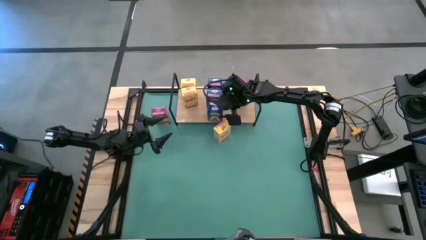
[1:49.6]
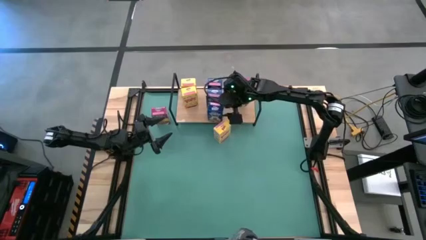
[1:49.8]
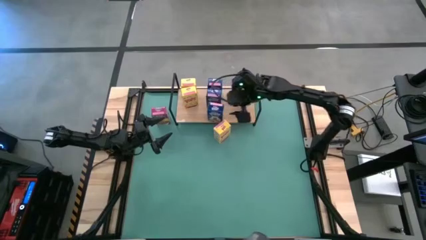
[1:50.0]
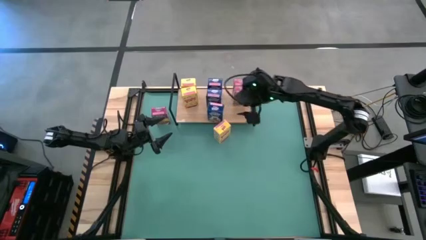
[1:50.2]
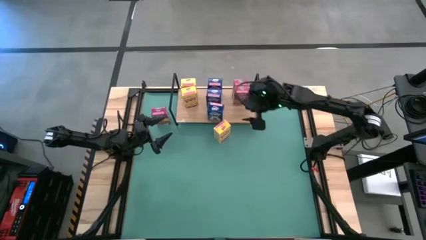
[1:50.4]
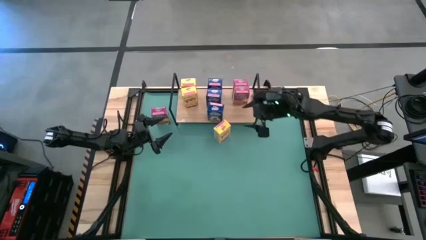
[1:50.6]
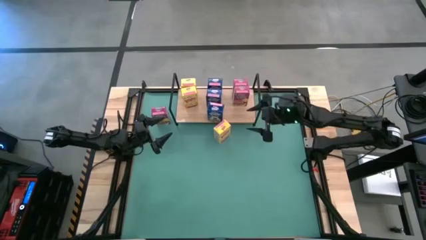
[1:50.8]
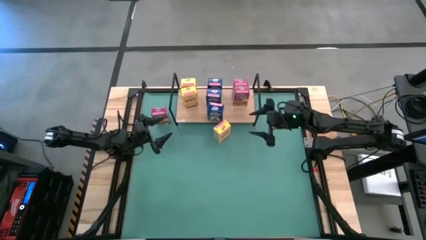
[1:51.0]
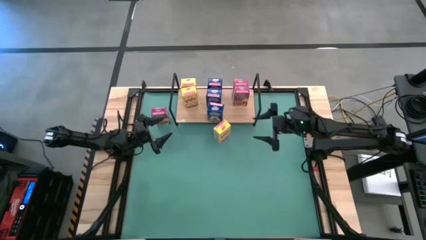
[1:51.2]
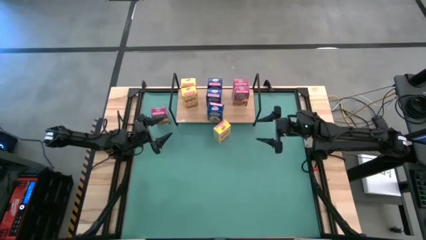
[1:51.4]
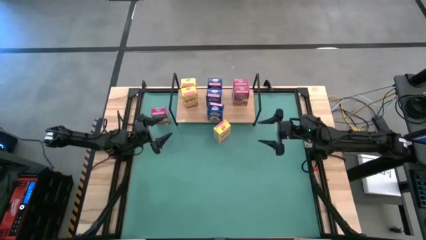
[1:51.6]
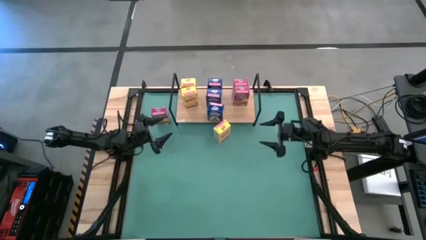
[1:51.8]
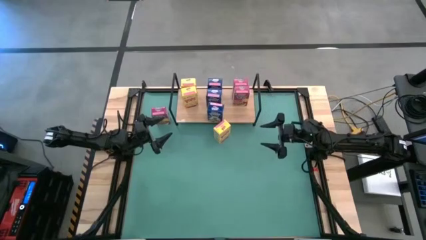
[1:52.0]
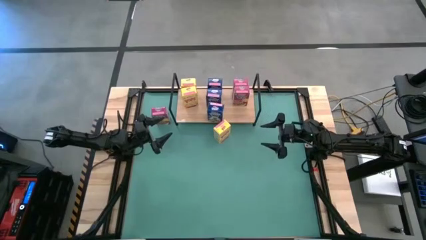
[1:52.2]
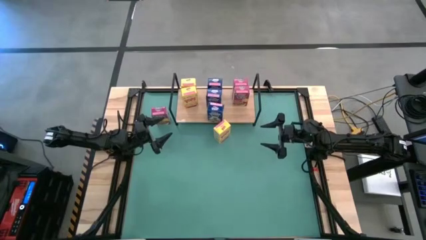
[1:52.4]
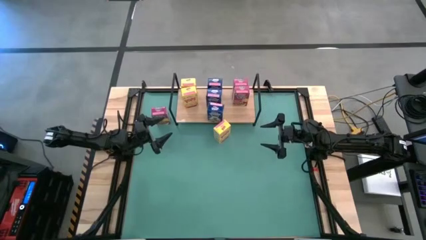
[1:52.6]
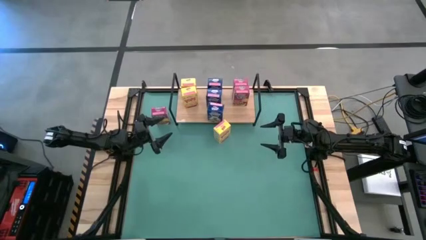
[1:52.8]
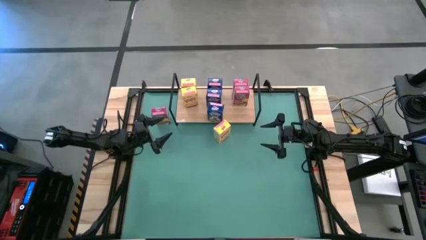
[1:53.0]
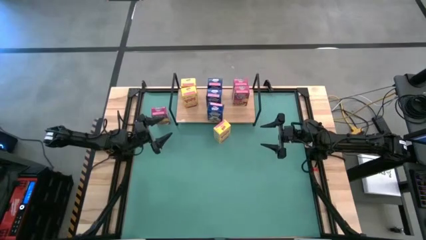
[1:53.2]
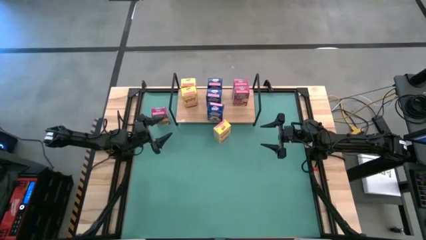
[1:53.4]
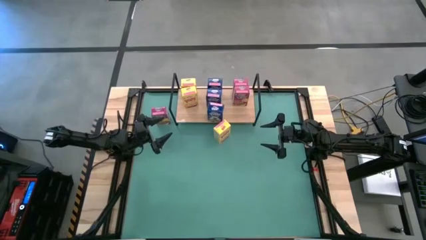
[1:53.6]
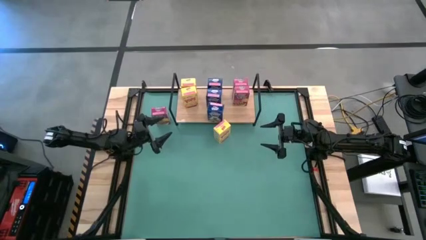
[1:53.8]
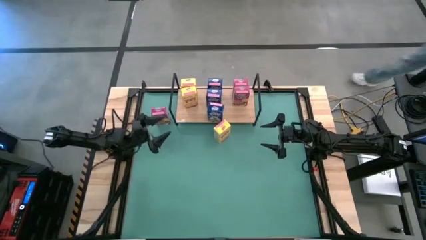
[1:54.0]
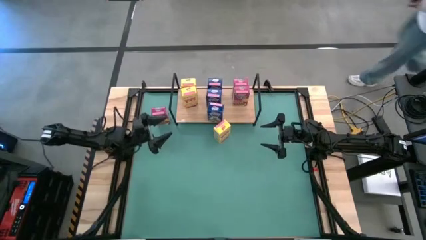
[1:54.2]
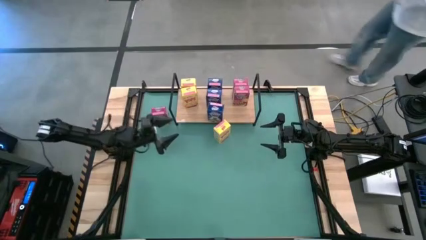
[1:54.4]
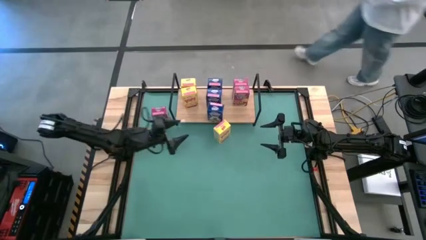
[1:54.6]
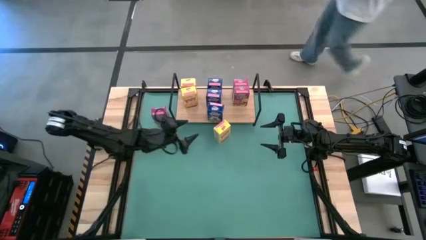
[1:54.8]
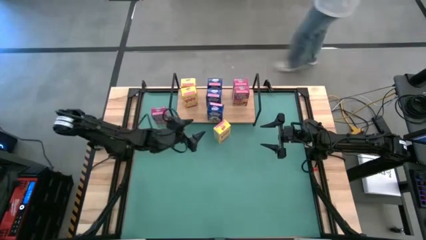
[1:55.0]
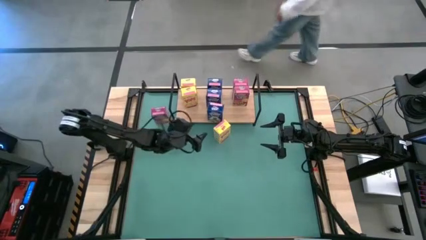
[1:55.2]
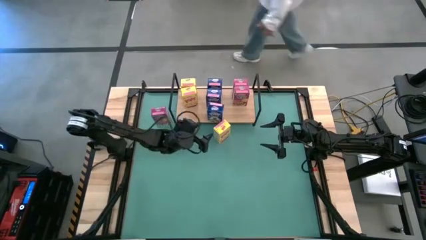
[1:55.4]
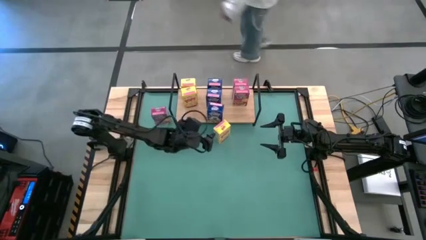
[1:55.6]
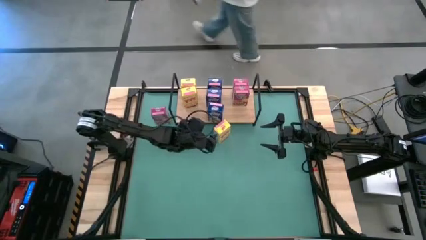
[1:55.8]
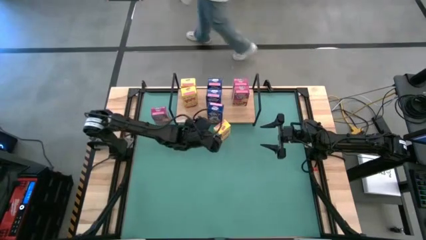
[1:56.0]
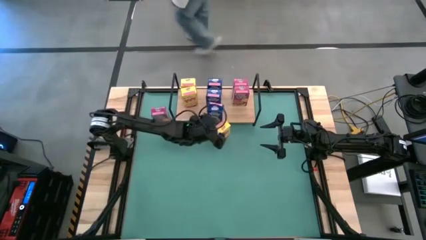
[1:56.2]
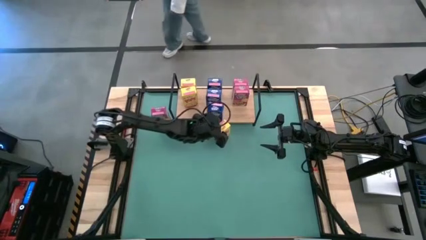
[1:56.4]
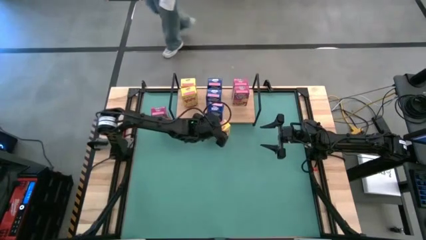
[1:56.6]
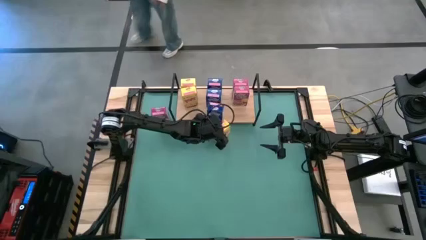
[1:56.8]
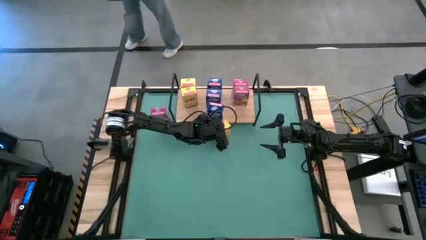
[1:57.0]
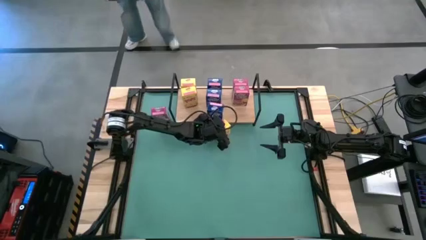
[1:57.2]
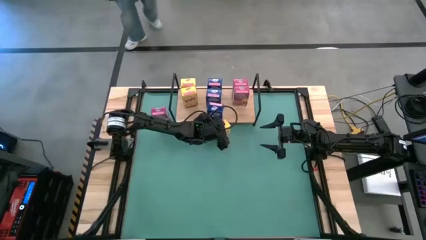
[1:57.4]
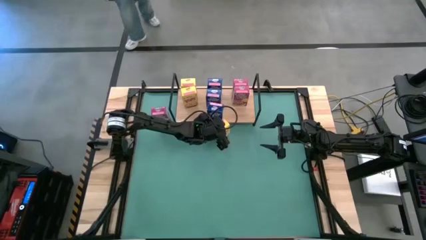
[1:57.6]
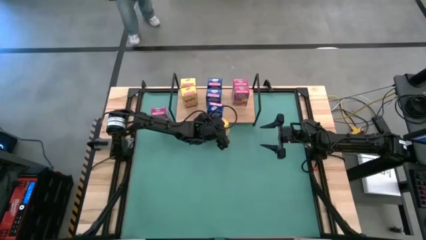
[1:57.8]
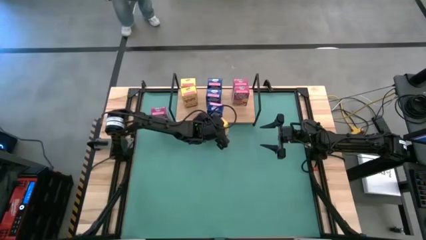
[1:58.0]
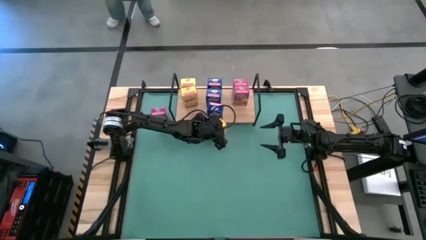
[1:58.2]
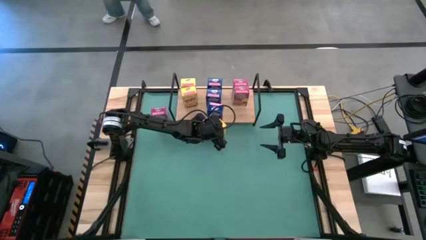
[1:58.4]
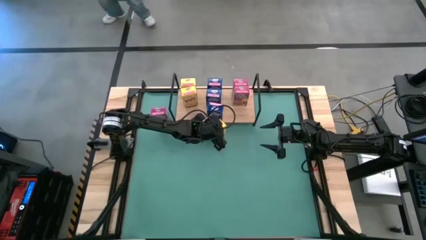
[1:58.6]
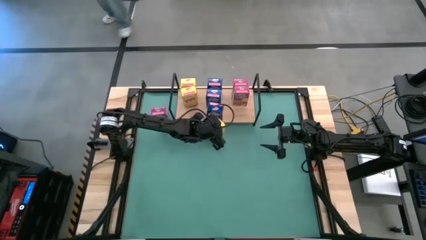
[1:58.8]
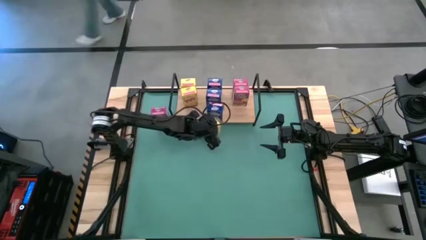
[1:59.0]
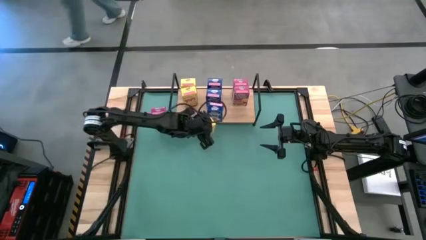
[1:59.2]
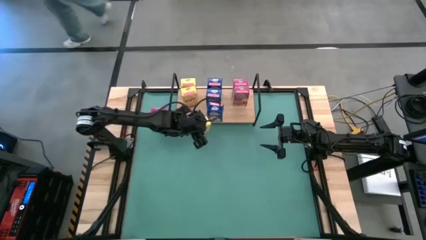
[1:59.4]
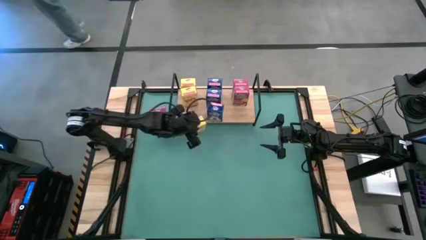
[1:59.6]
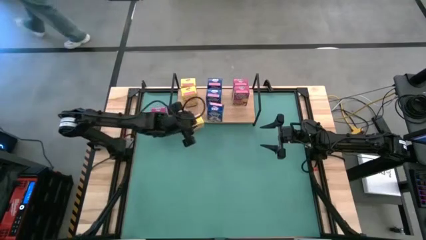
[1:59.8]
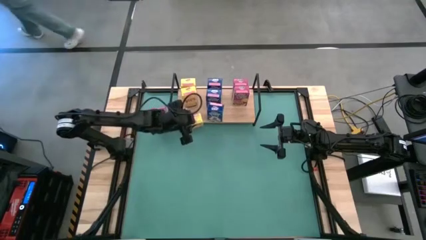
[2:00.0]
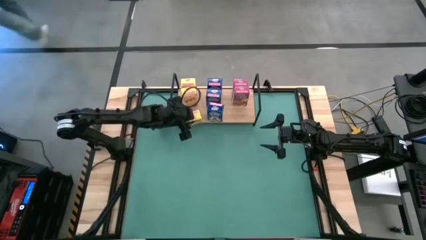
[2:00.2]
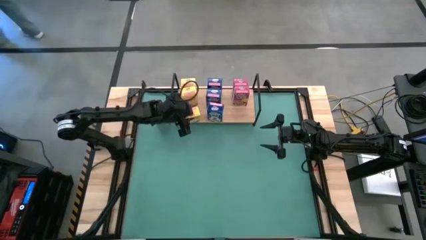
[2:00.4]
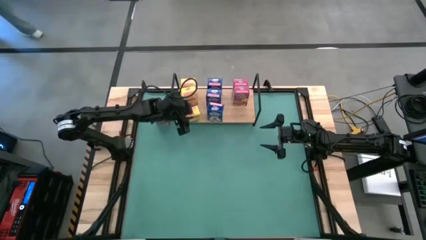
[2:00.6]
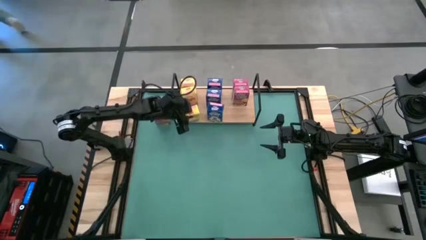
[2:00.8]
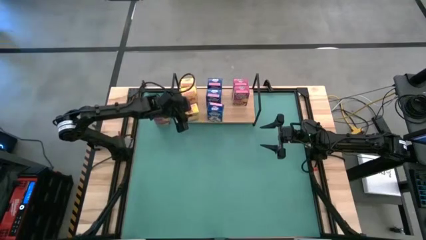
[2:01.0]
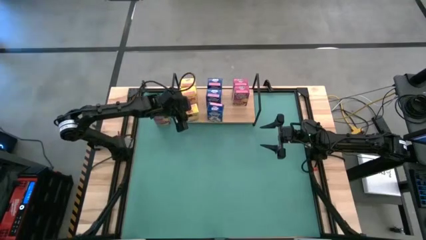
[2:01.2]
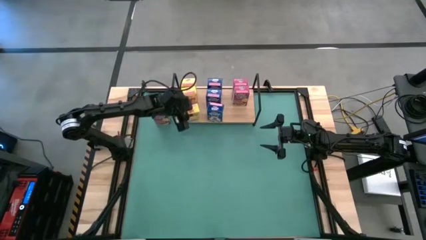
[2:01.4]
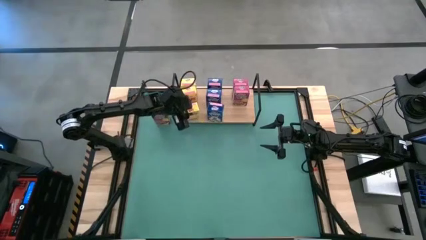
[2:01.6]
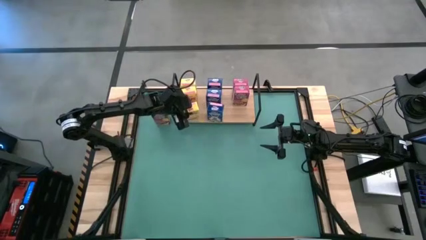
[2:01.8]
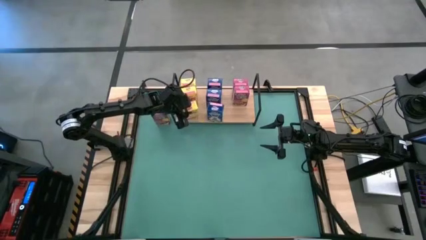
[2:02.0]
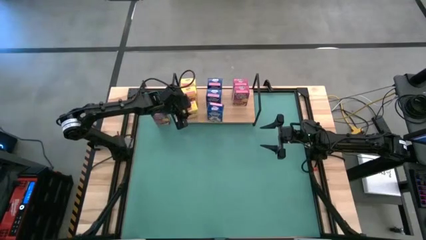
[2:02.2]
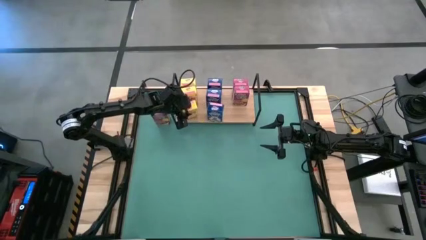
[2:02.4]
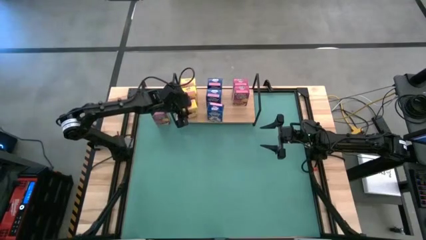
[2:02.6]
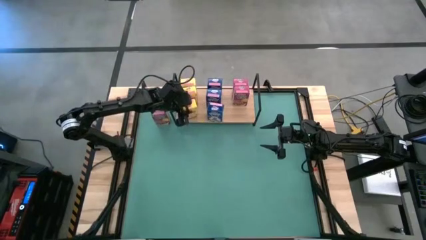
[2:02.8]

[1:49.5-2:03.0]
Task: Stack cereal on shelf
Put the yellow cereal box on the shelf aligned with the other yellow cereal boxes
